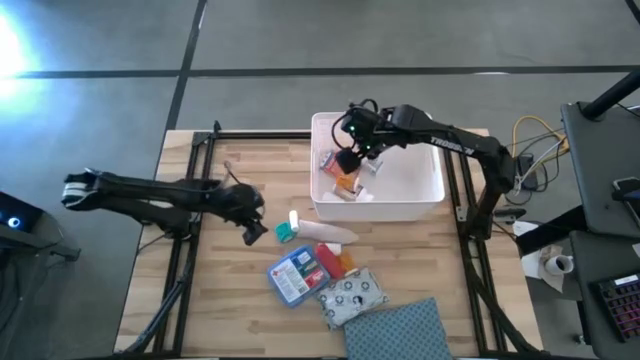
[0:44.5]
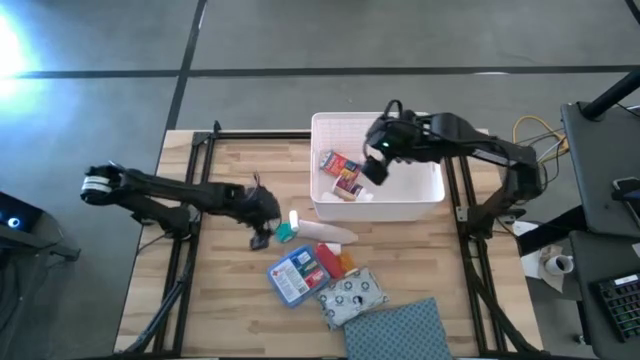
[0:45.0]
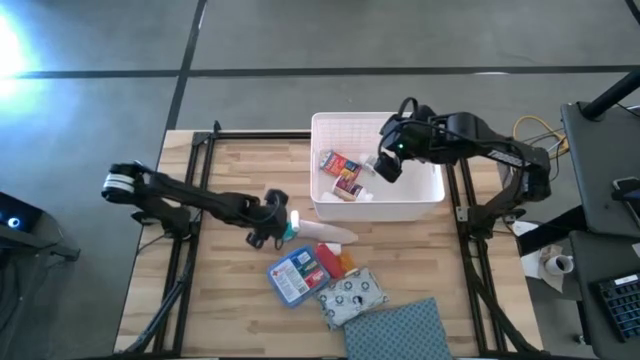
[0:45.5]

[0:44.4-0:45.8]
Task: Pick & place medical supplies in basket/bin
Put the green bandage into the white bin

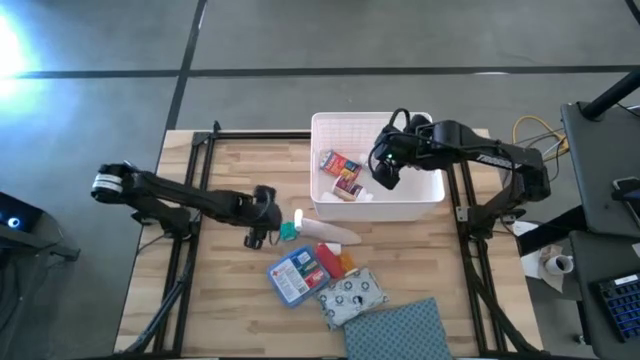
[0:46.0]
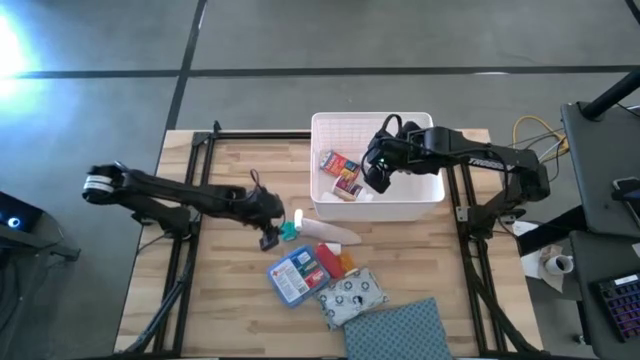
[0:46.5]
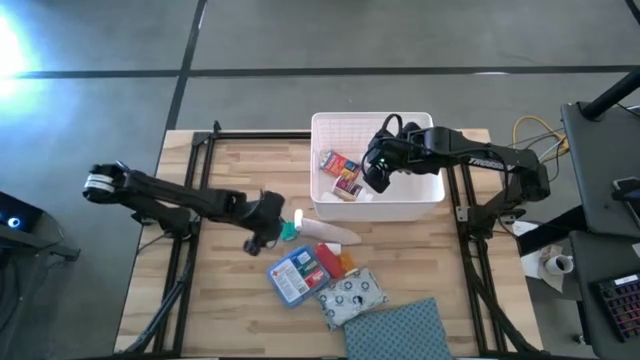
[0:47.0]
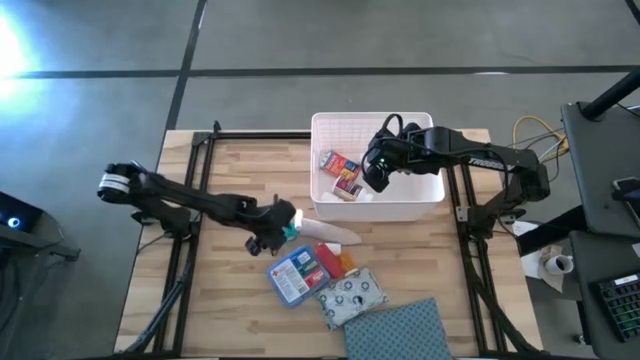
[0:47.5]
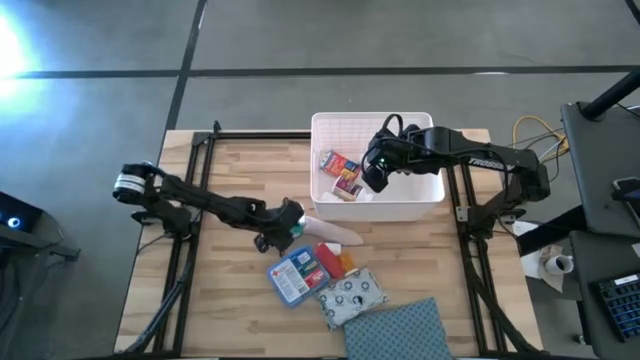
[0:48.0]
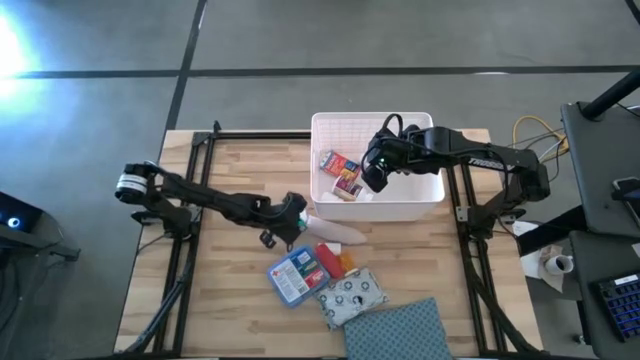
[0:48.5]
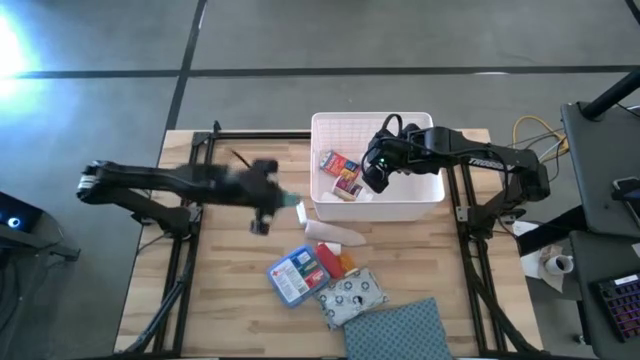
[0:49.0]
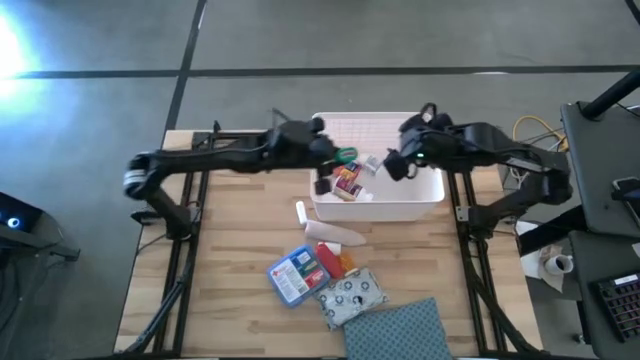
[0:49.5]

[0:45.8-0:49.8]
Put the green bandage into the white bin

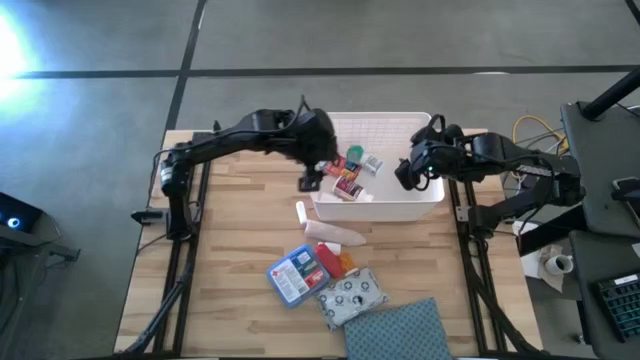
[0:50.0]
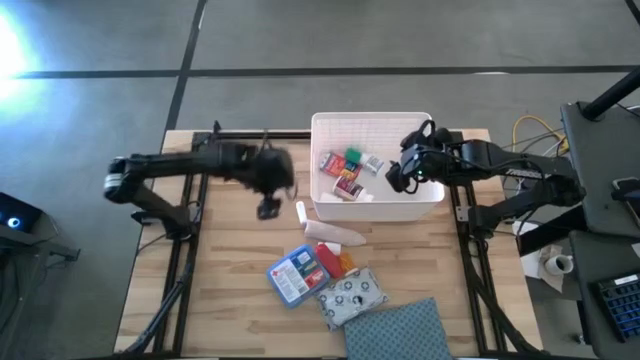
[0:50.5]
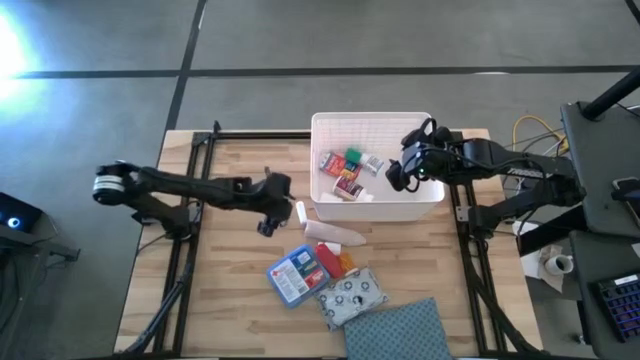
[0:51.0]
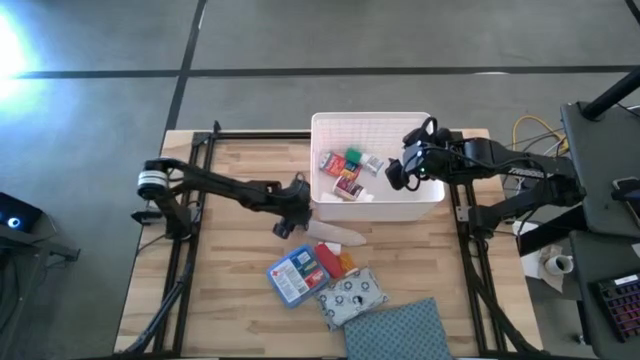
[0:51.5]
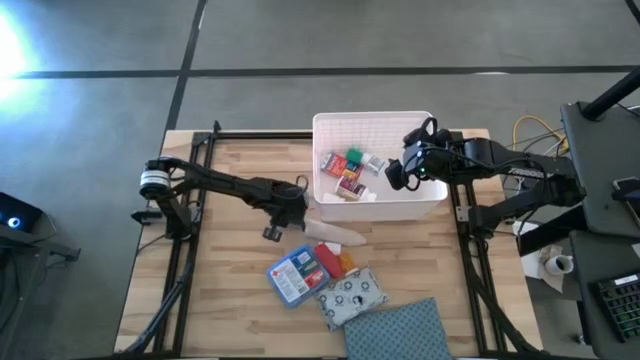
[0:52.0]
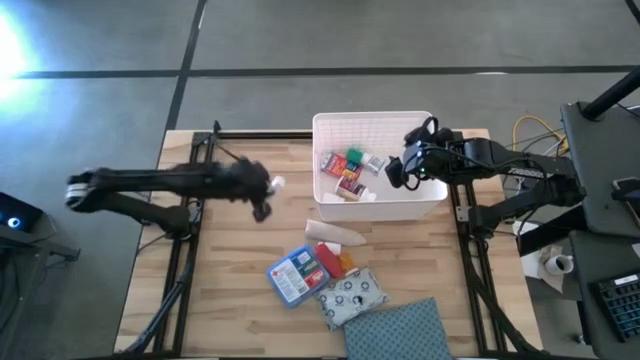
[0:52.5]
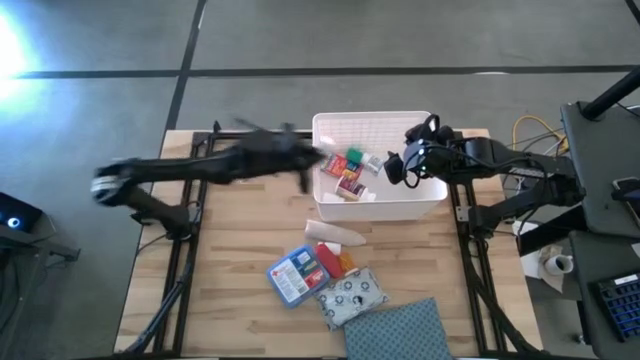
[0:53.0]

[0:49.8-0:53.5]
Put the white rolled gauze into the white bin

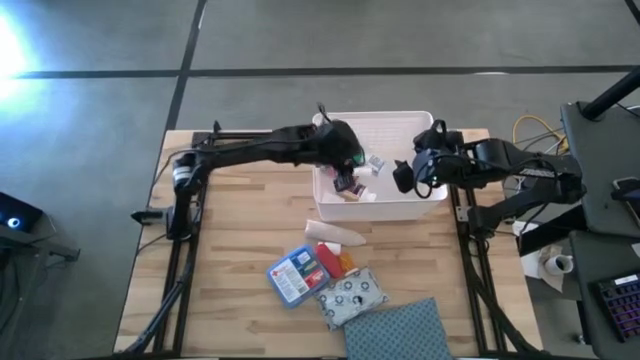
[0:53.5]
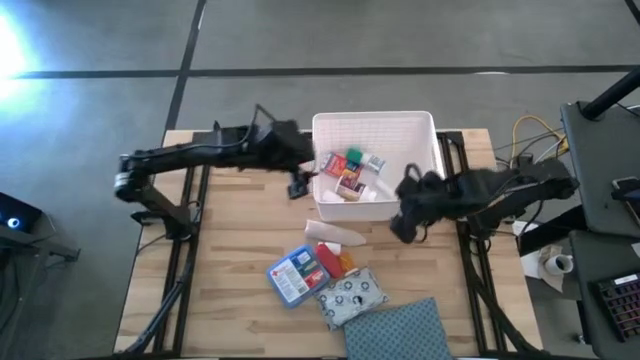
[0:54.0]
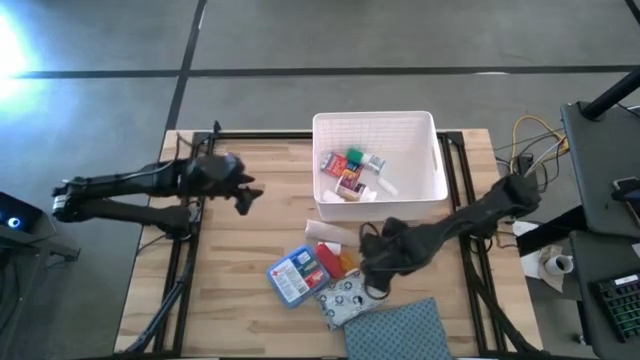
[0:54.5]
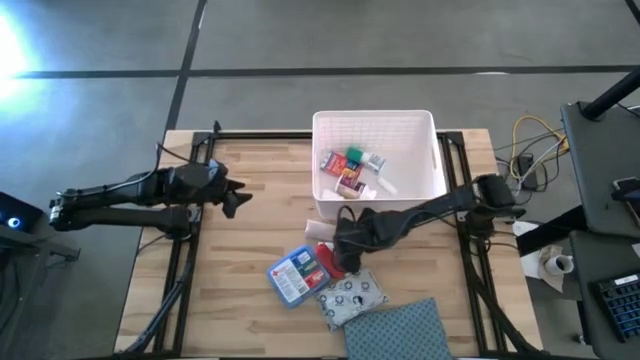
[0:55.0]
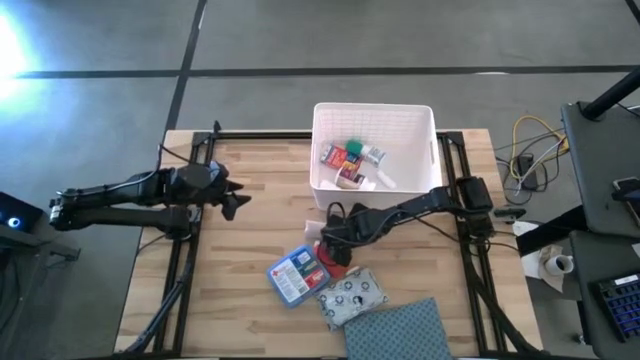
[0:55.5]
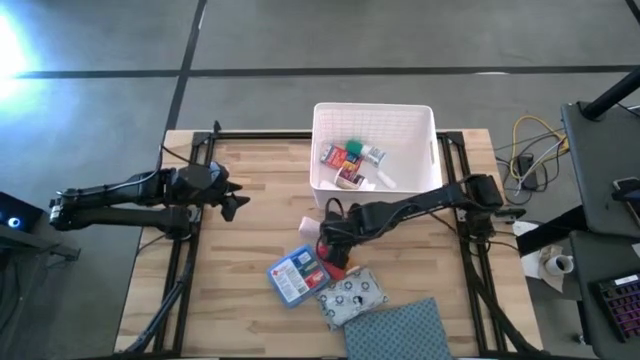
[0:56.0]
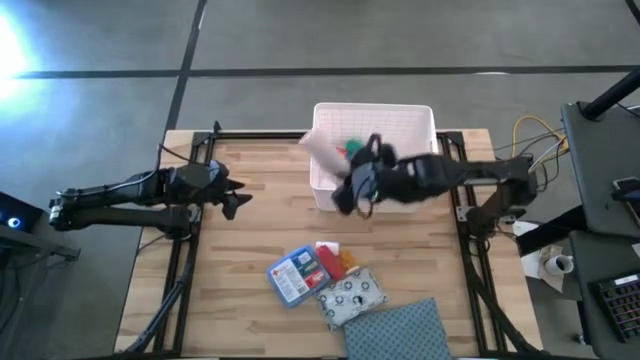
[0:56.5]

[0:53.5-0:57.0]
Put the gray bandage into the white bin

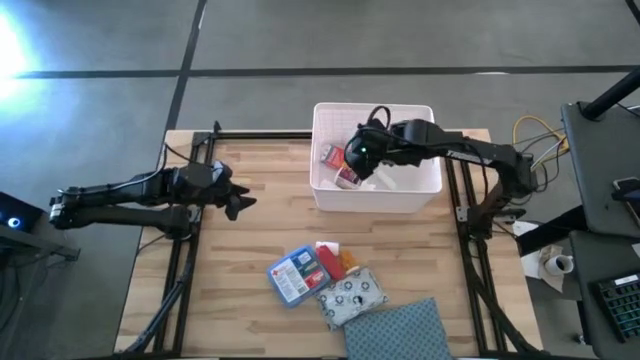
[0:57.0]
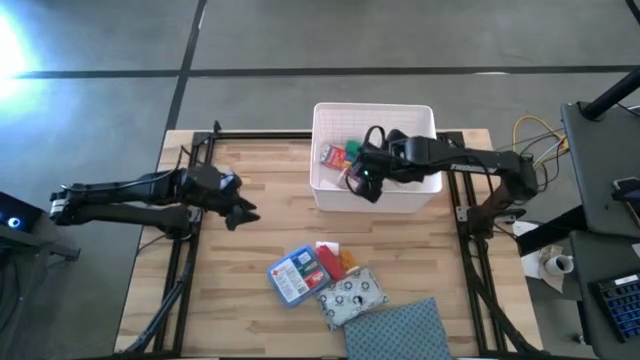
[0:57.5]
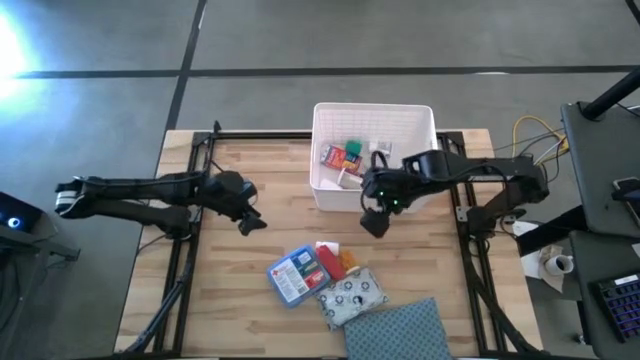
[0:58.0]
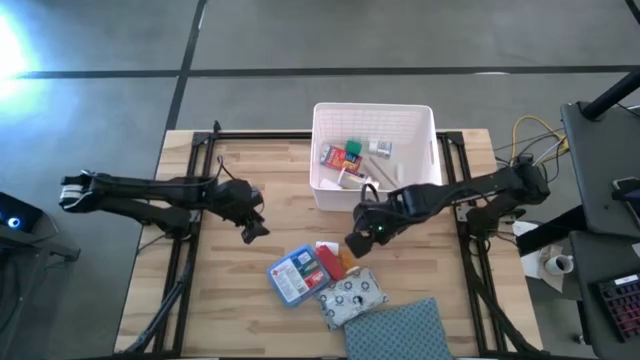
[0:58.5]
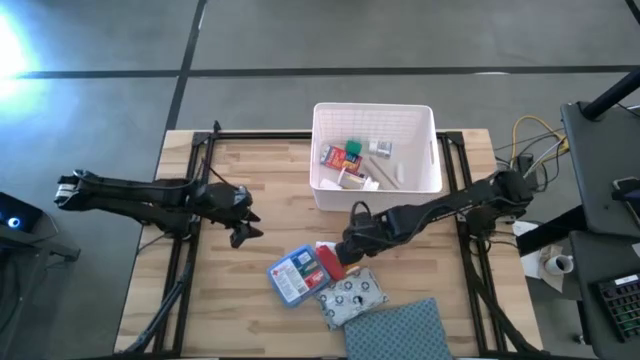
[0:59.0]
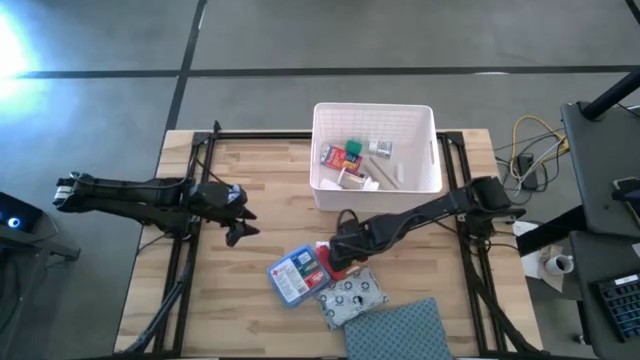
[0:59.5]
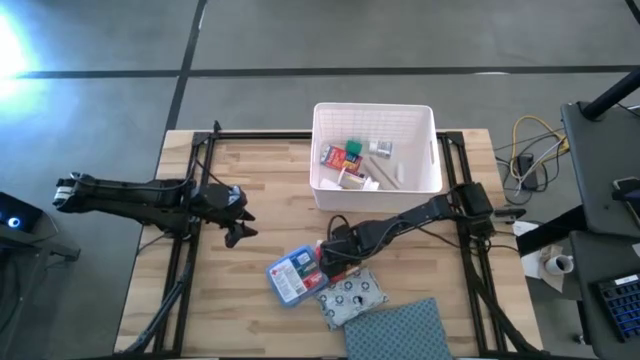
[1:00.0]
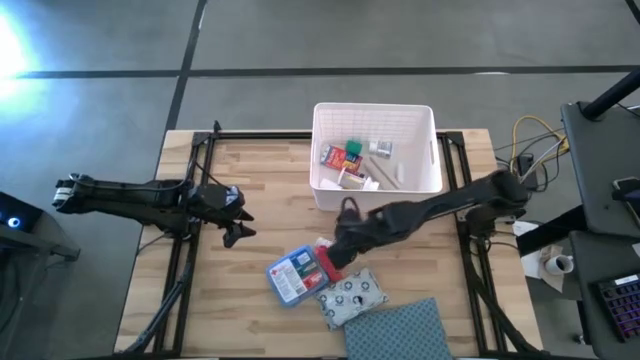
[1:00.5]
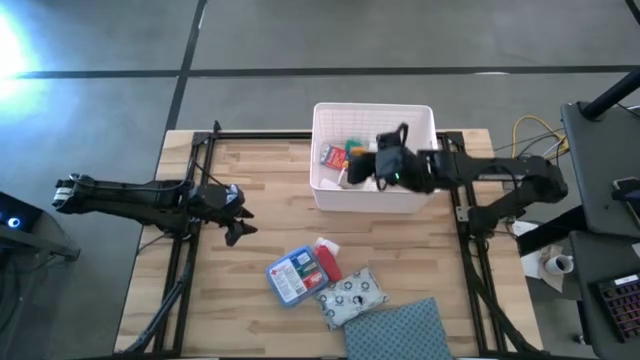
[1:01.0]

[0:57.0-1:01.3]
Put the orange pill bottle into the white bin

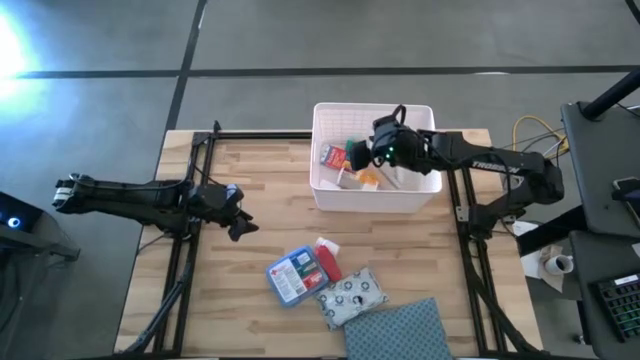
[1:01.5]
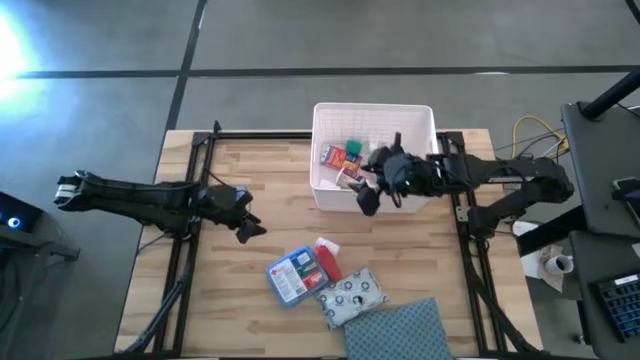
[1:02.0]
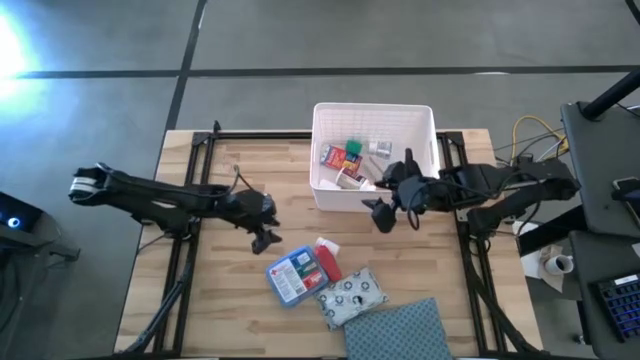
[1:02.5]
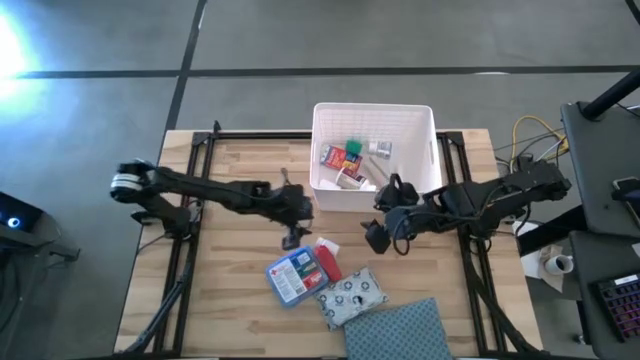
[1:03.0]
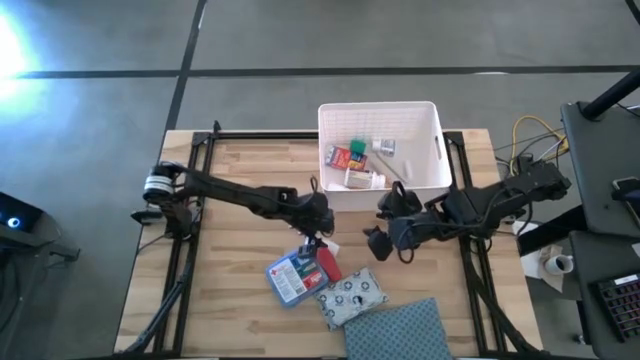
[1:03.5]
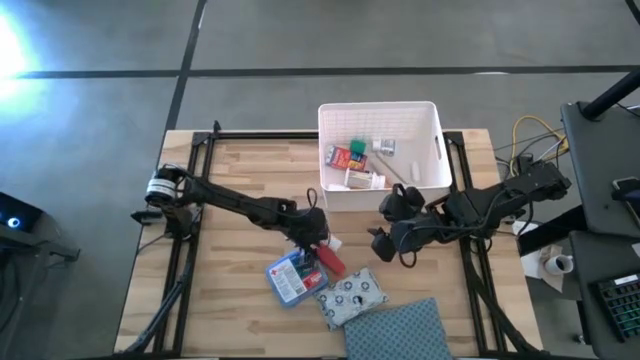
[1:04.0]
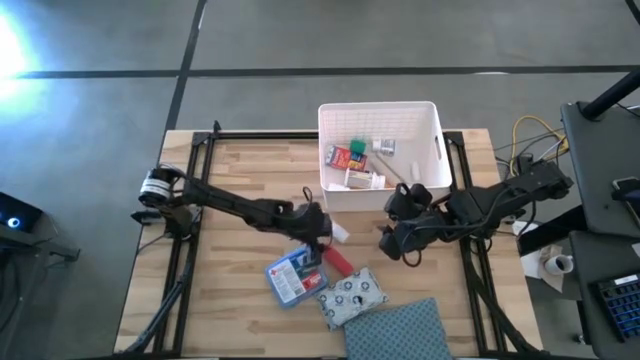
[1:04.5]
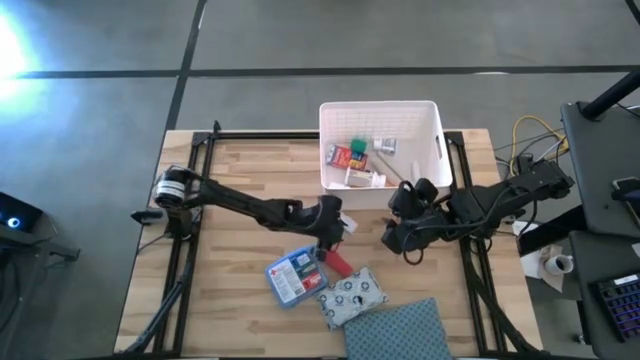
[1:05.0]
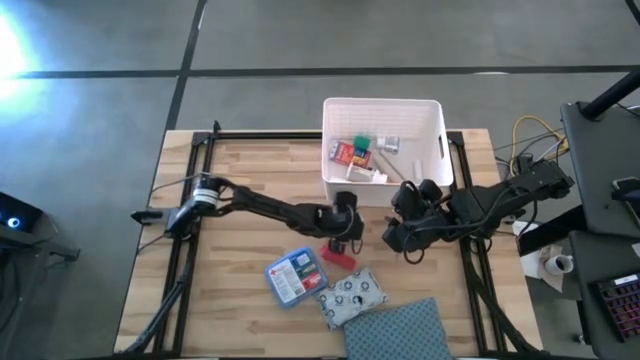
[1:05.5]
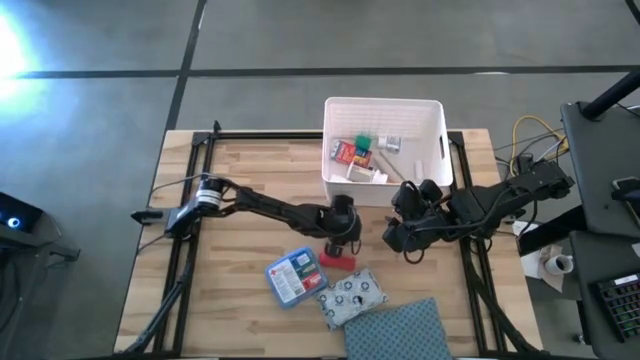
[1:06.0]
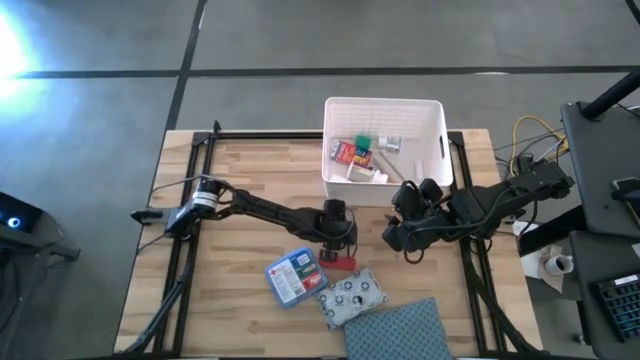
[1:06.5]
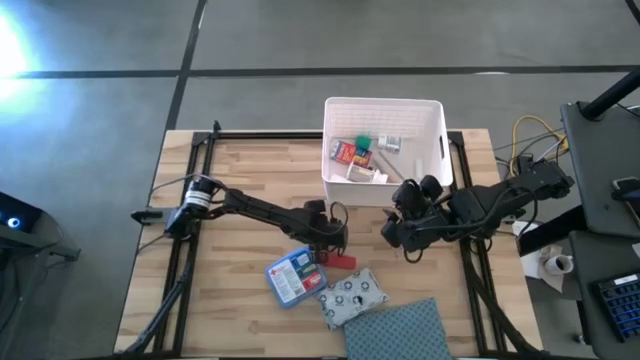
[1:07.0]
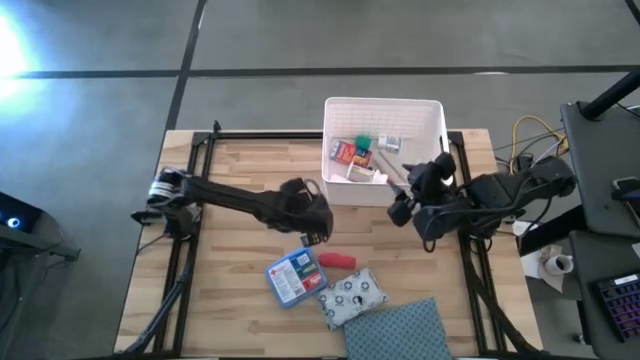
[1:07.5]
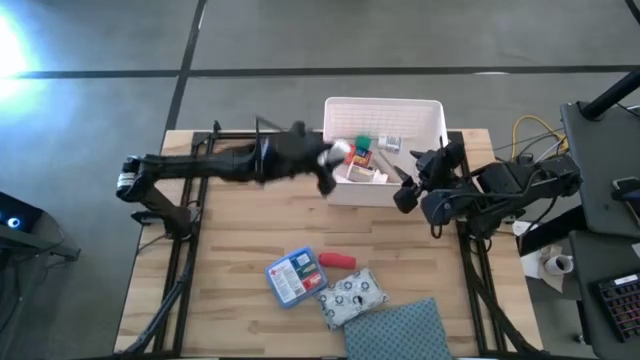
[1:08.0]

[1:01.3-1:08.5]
Put the white pill bottle into the white bin
